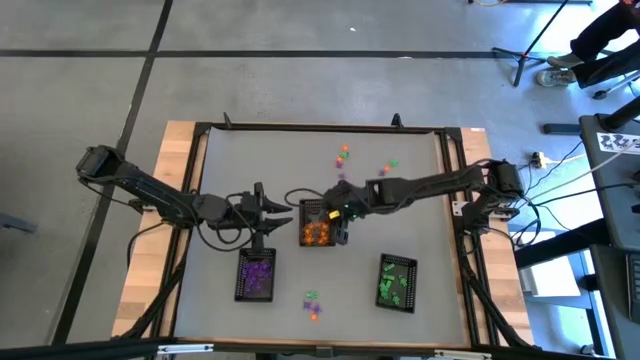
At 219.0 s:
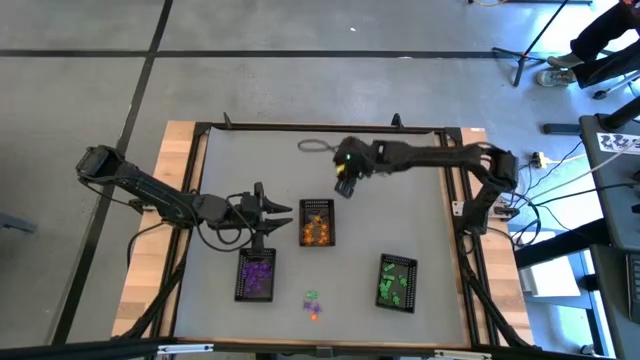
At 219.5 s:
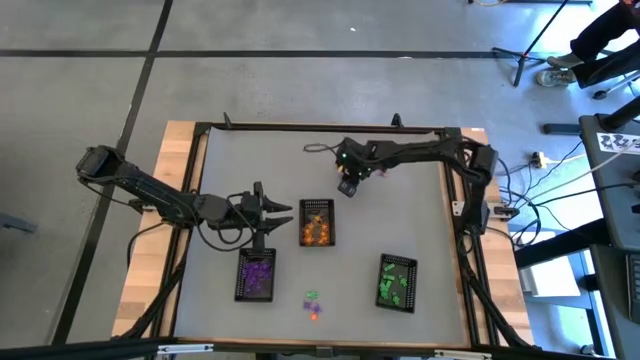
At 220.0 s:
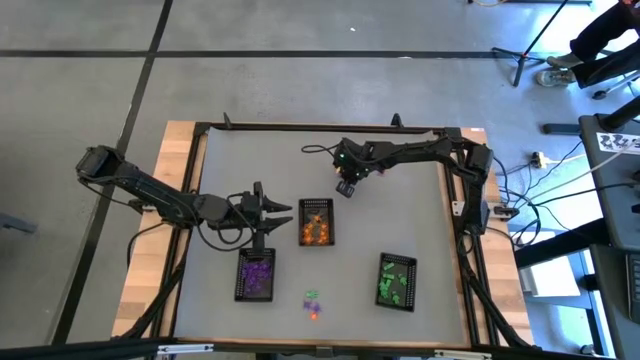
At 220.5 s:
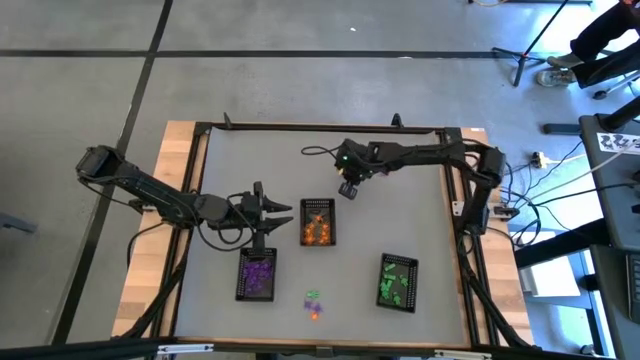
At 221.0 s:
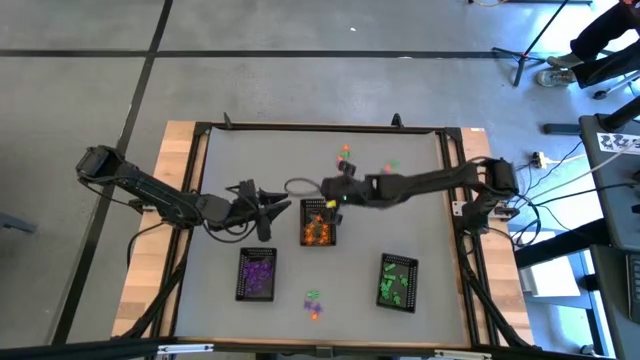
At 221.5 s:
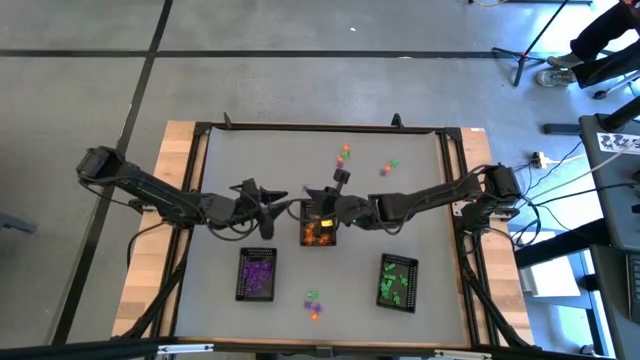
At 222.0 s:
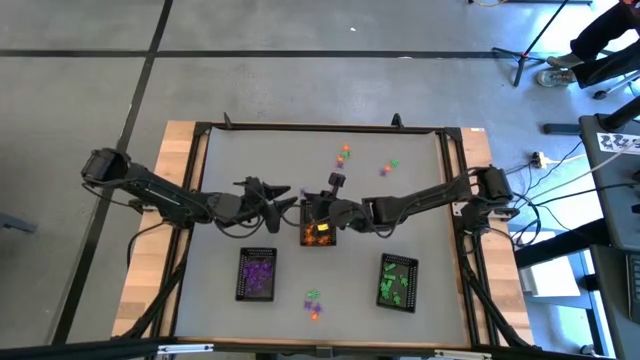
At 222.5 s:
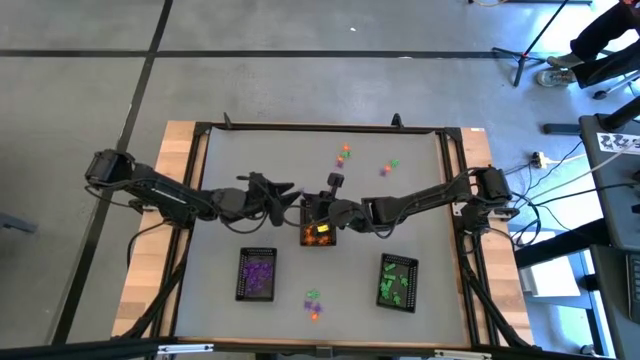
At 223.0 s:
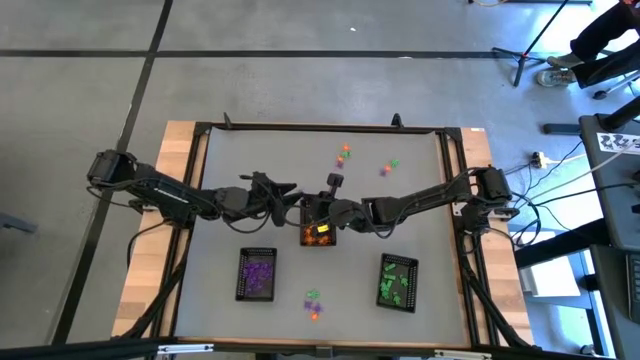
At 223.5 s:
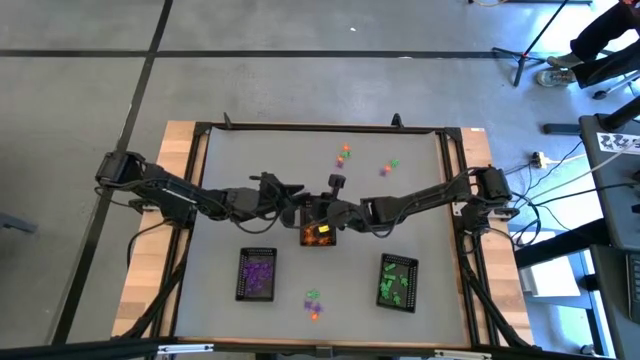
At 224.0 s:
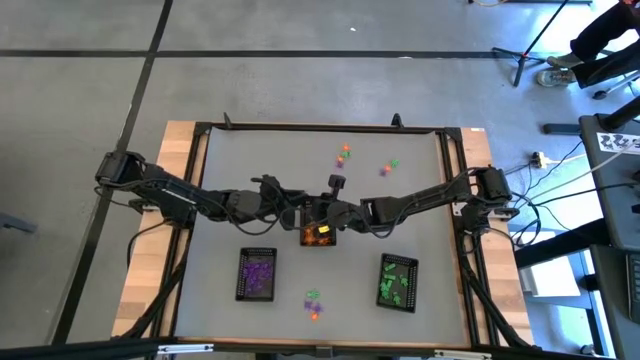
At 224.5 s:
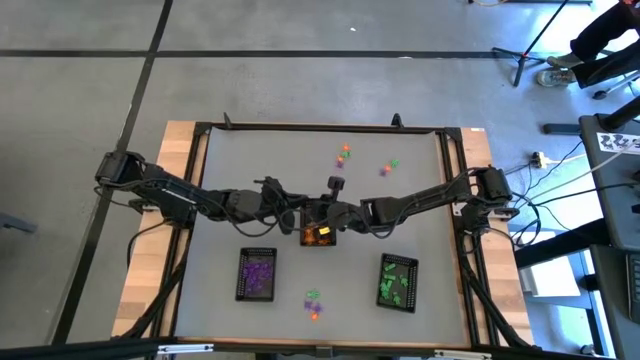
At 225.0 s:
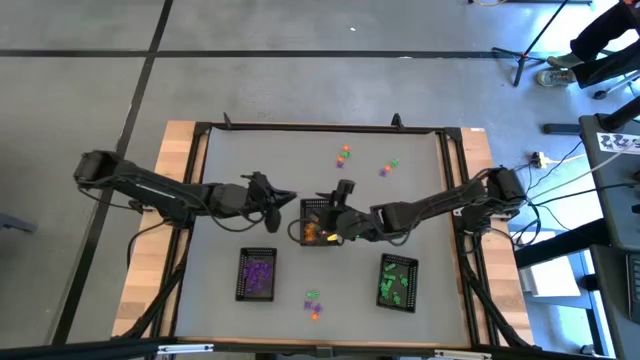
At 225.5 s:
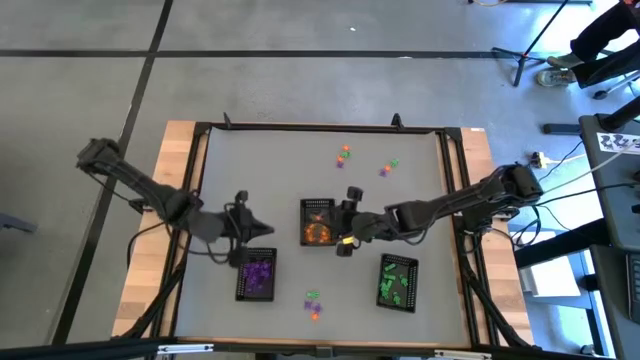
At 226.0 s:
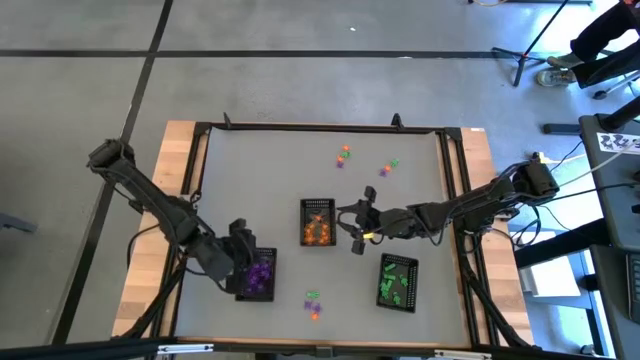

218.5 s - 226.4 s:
Task: Sort Halloween decoration
Put the violet spider toy into the bottom left black bin

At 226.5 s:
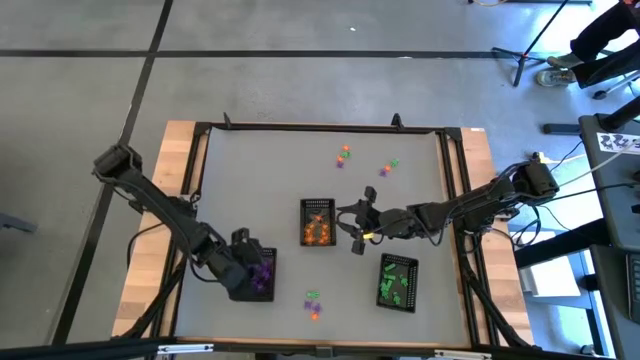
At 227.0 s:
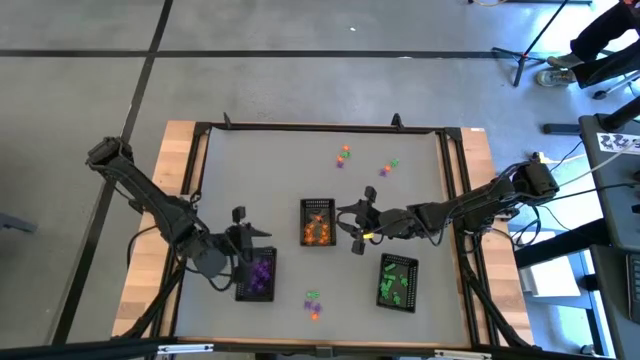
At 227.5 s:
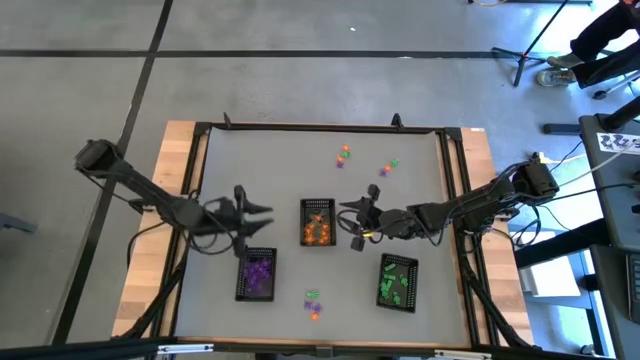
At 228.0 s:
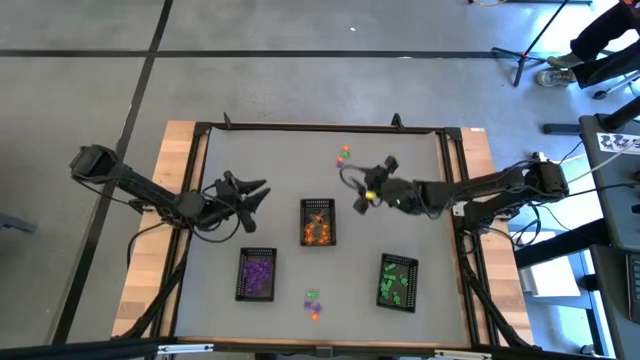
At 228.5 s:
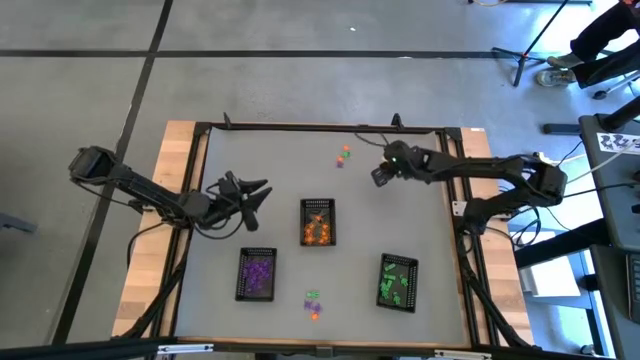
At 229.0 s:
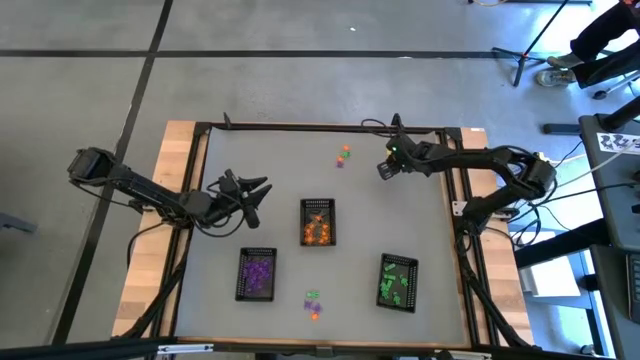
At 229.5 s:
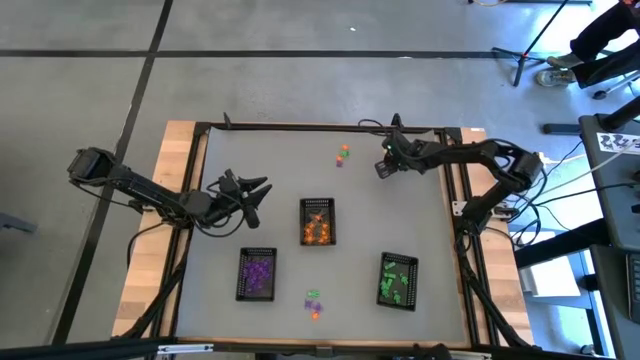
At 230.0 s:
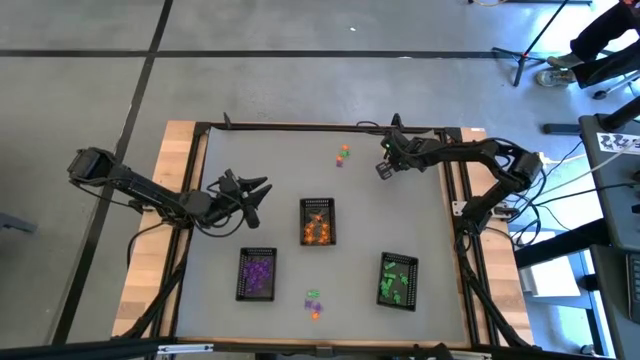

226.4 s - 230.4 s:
Put the green skeleton toy into the bottom right black bin

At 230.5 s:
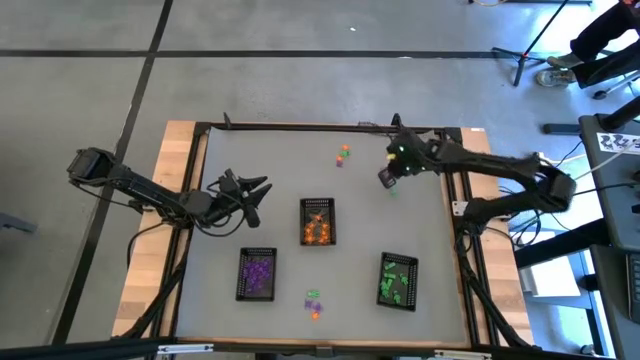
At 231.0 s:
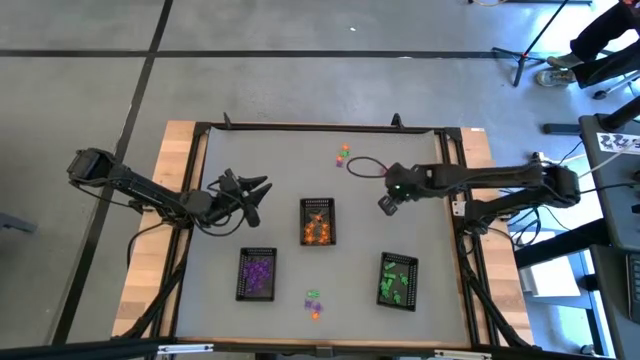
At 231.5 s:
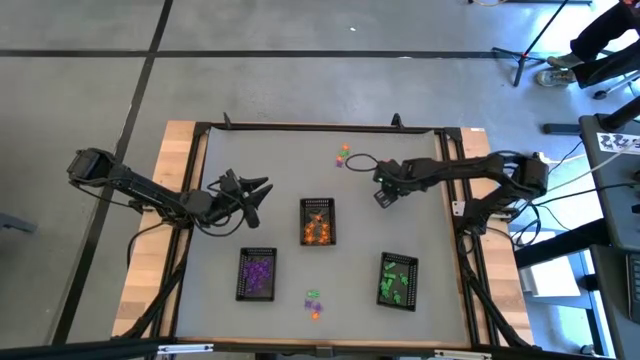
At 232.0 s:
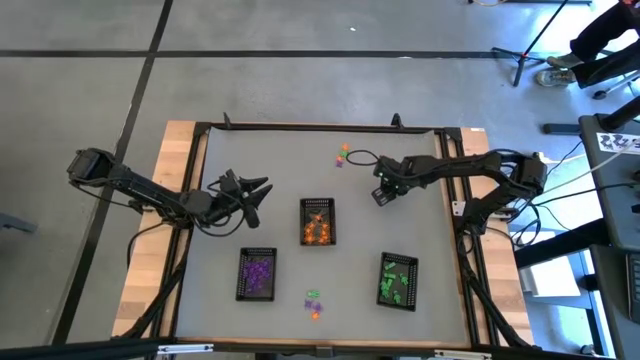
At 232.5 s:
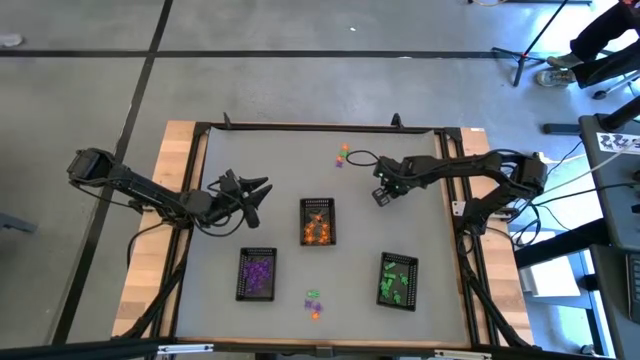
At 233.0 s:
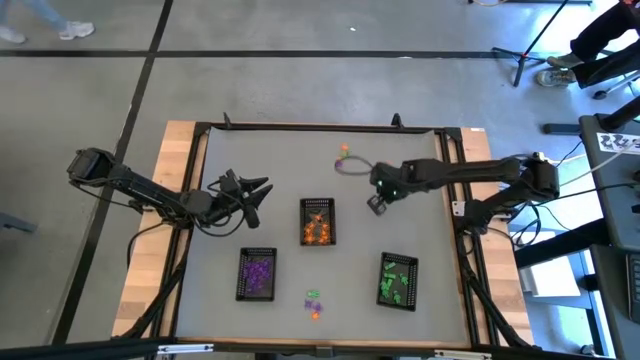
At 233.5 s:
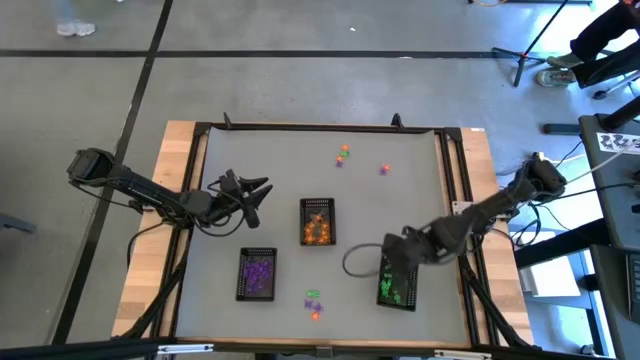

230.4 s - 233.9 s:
Put the green skeleton toy into the bottom right black bin

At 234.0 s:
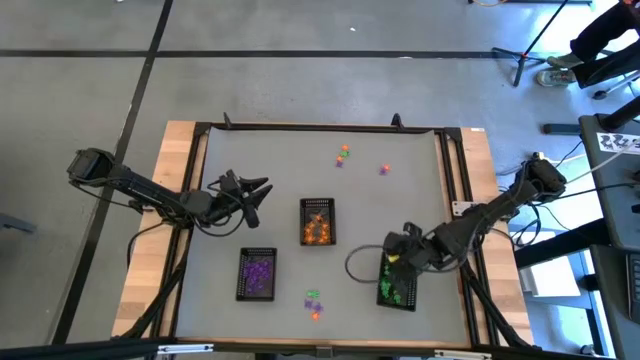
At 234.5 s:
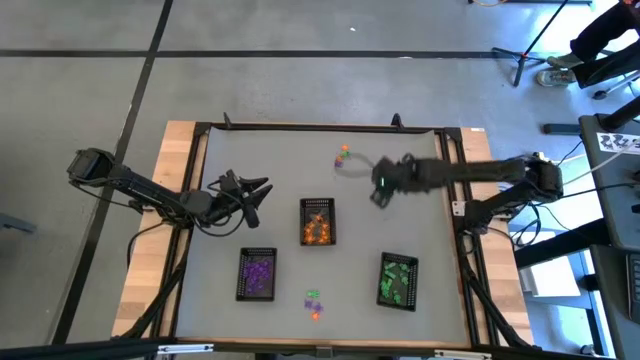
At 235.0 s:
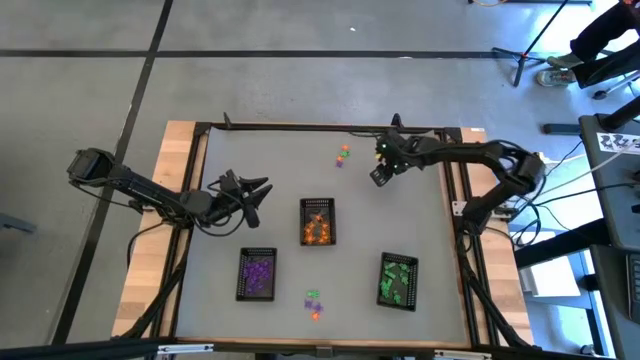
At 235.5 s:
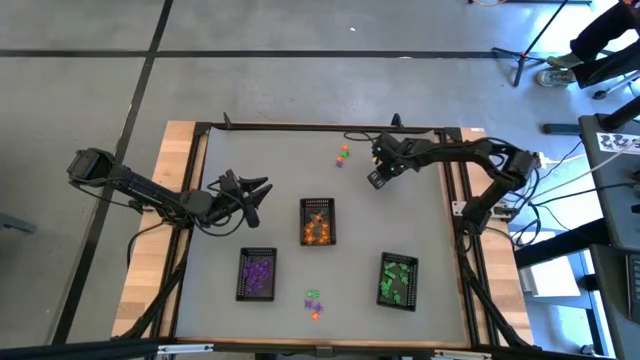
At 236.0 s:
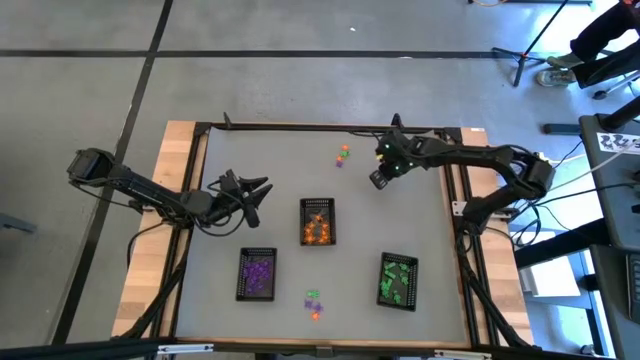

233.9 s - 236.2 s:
Put the violet spider toy into the bottom left black bin

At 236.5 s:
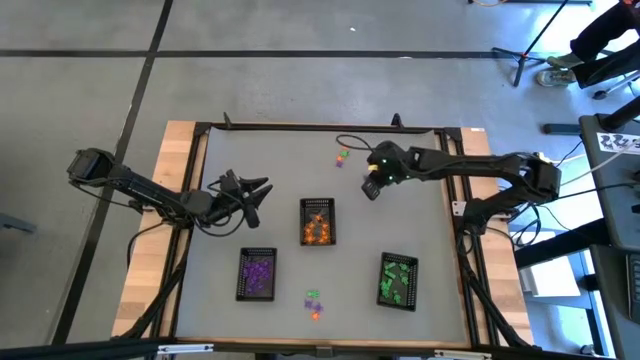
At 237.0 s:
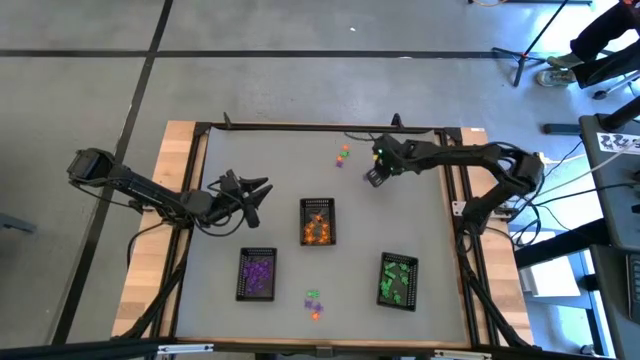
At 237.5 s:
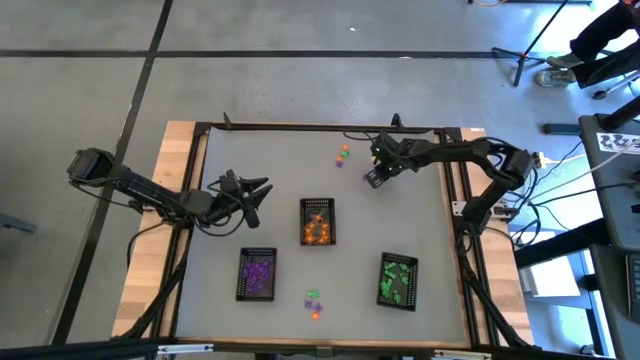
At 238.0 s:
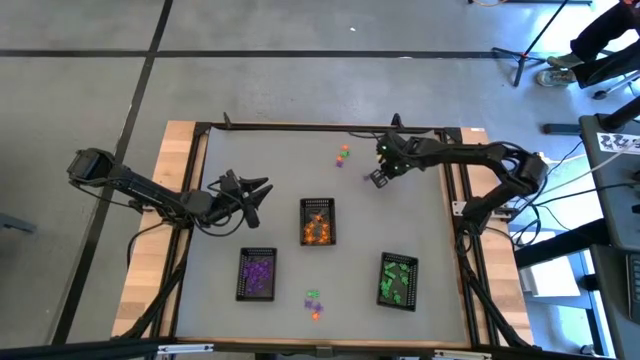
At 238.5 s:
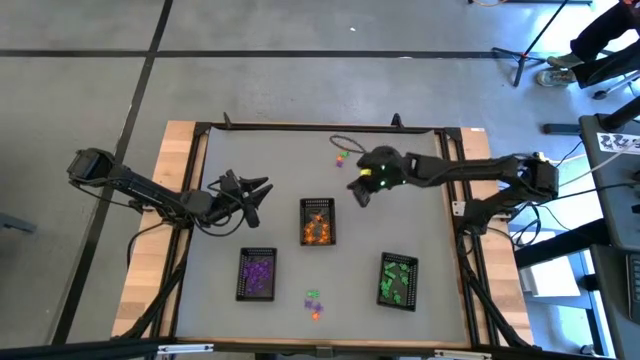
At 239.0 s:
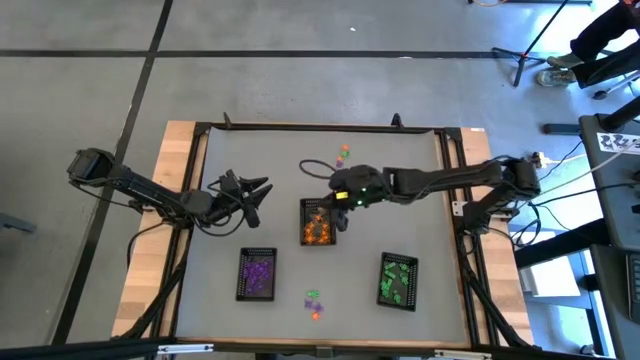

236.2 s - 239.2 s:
Put the orange spider toy into the top black bin
